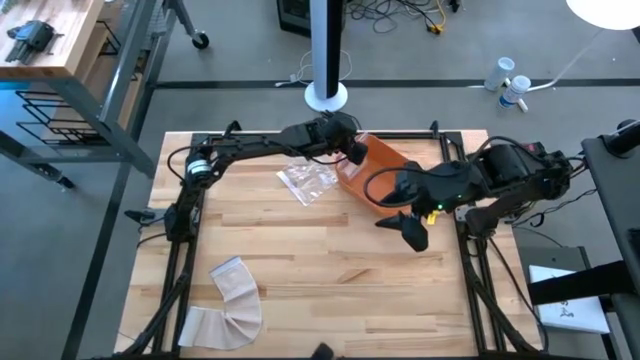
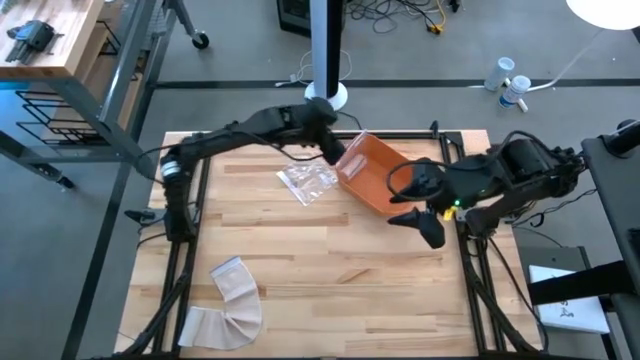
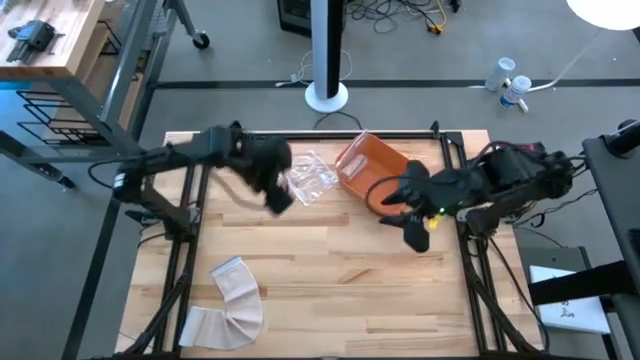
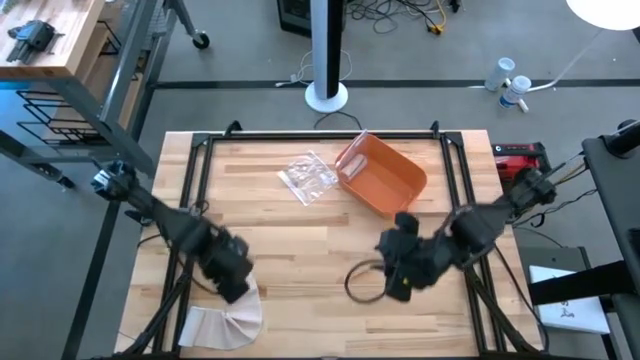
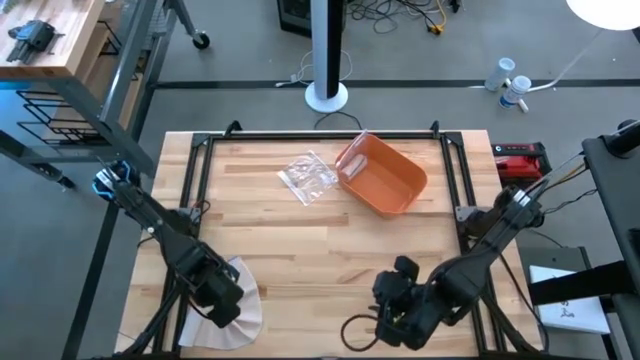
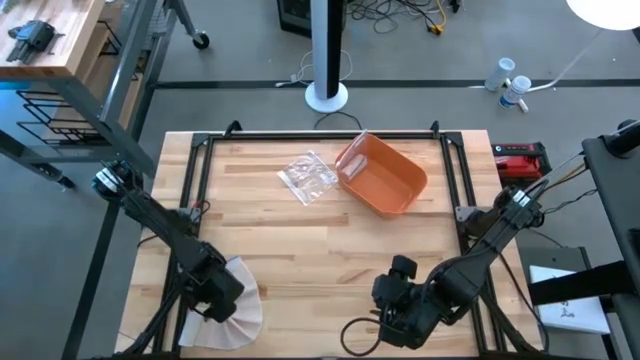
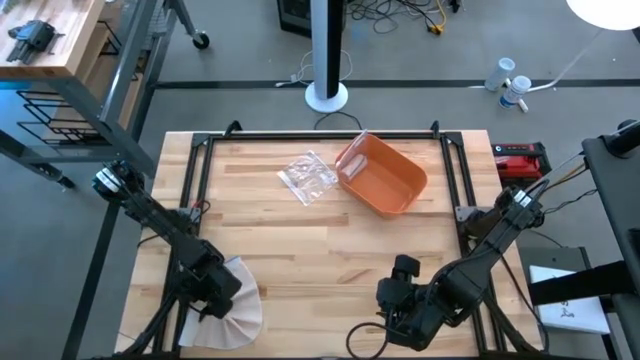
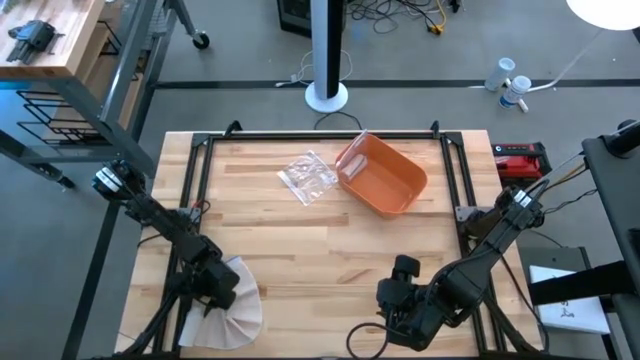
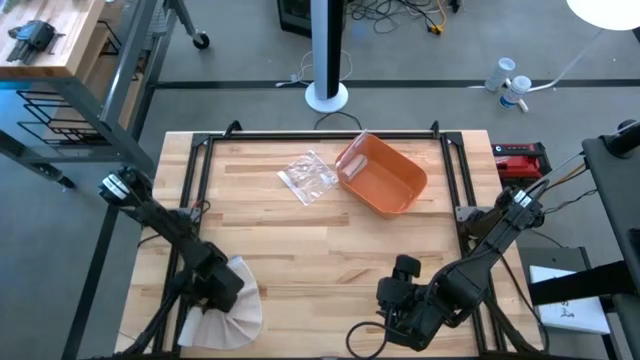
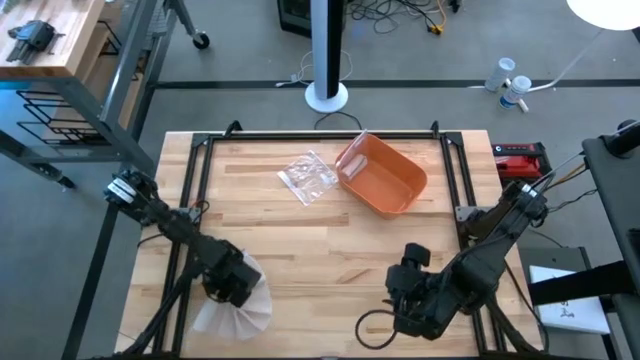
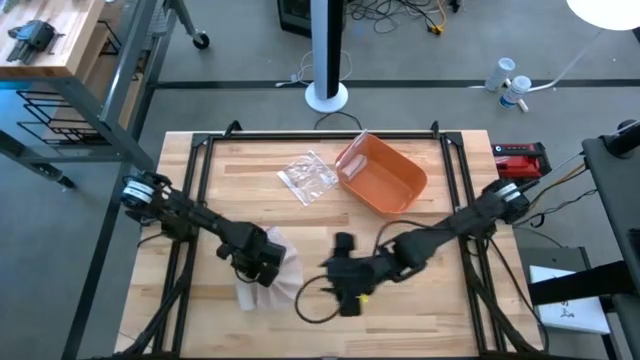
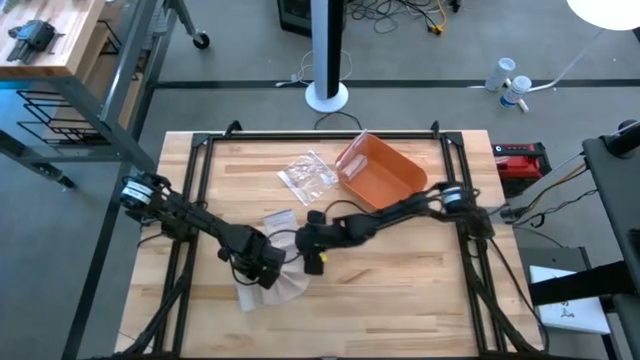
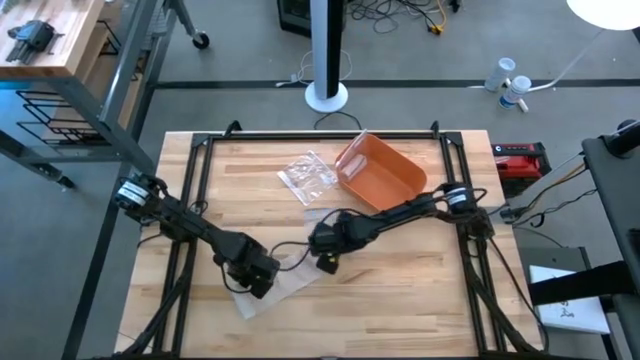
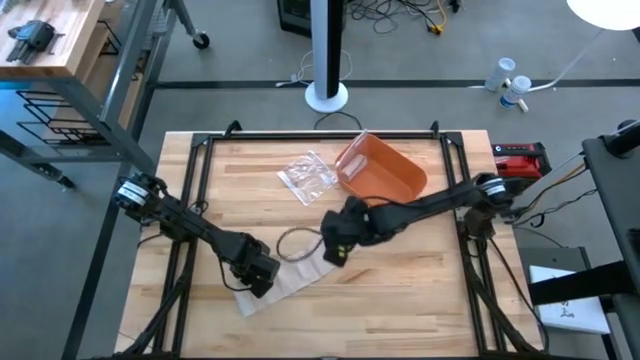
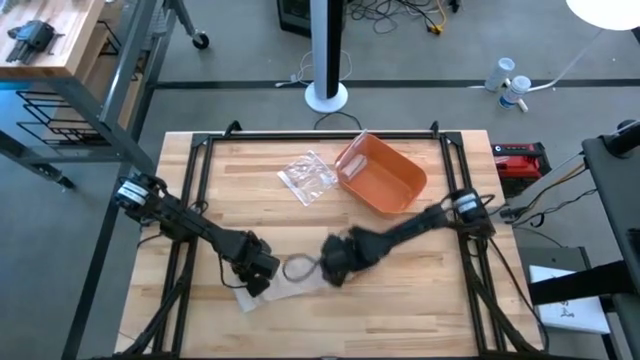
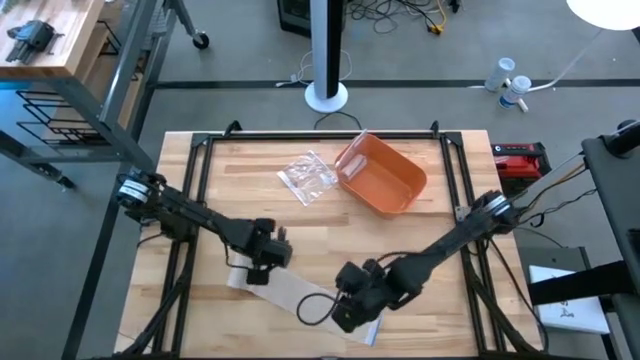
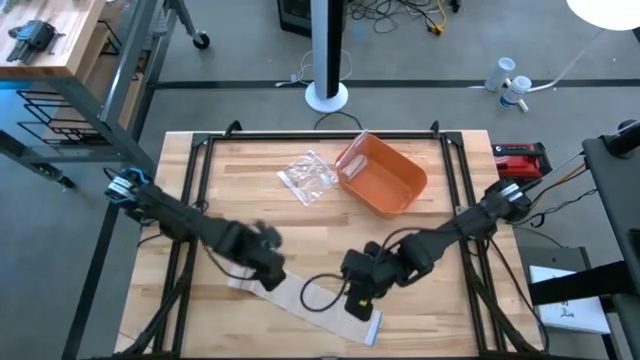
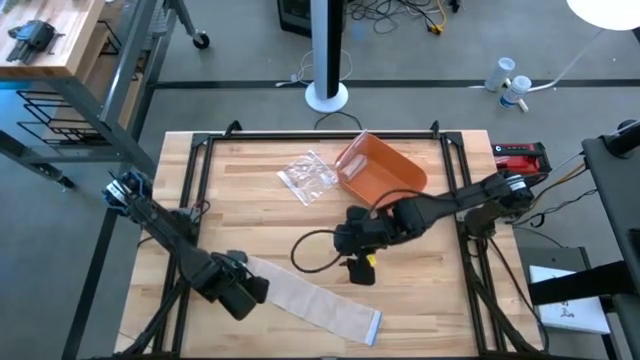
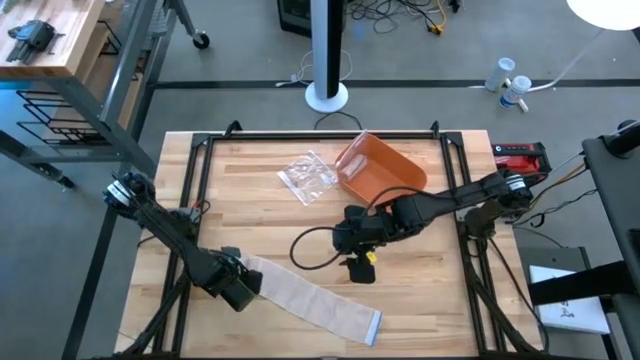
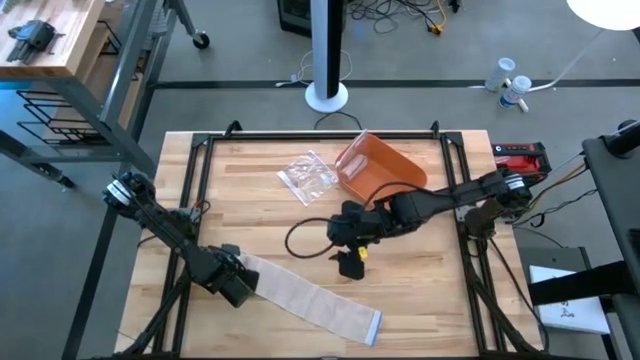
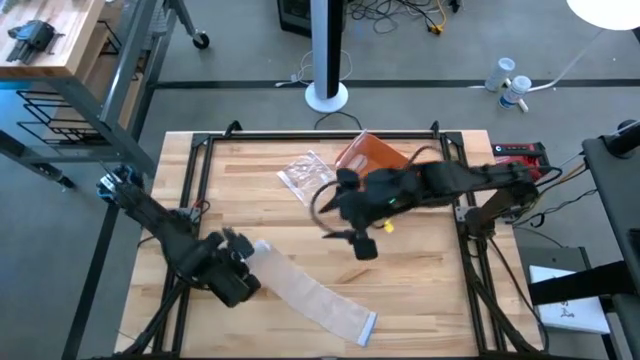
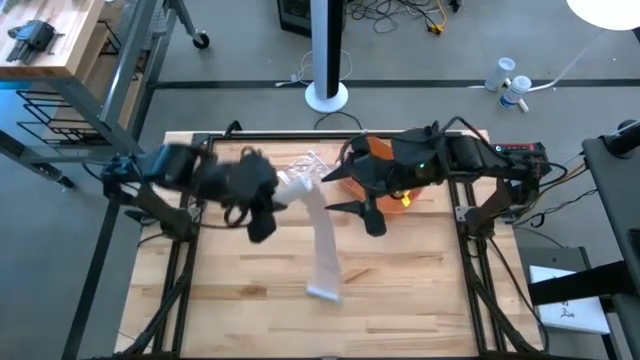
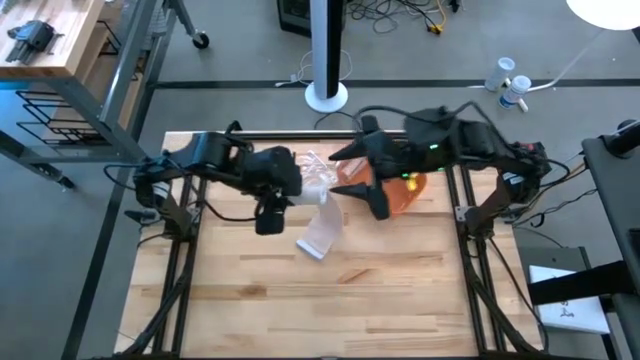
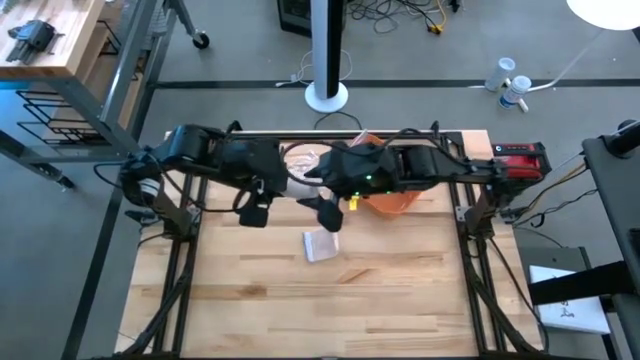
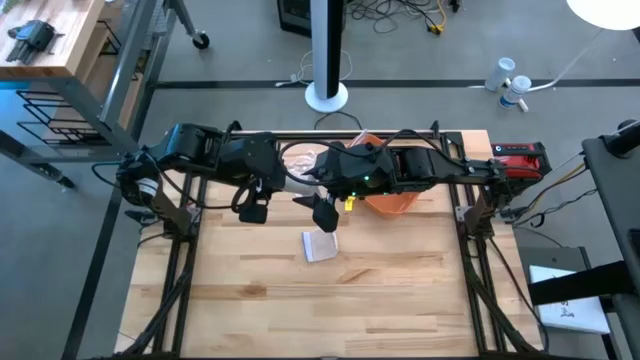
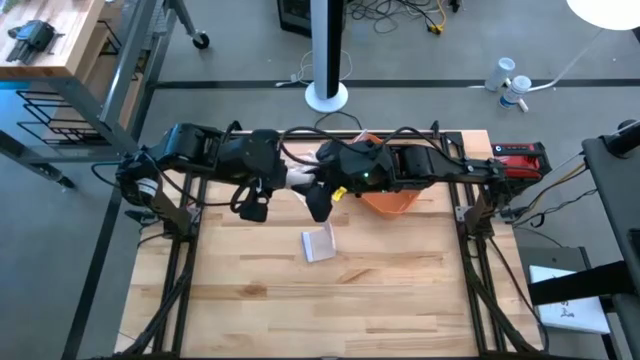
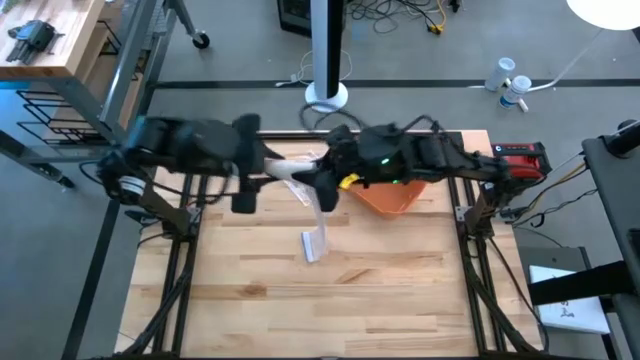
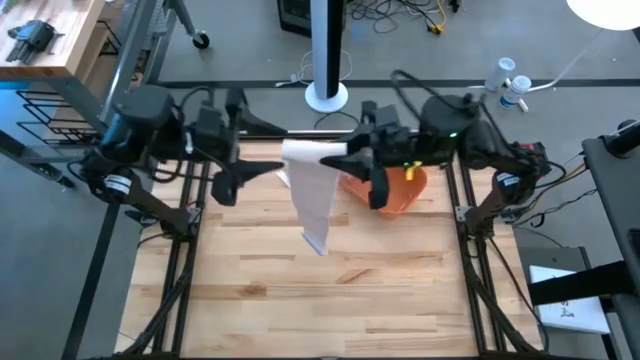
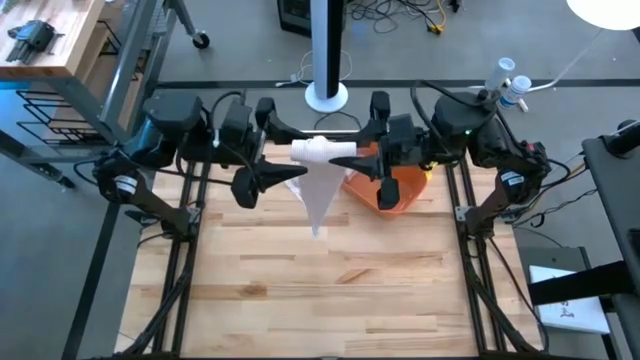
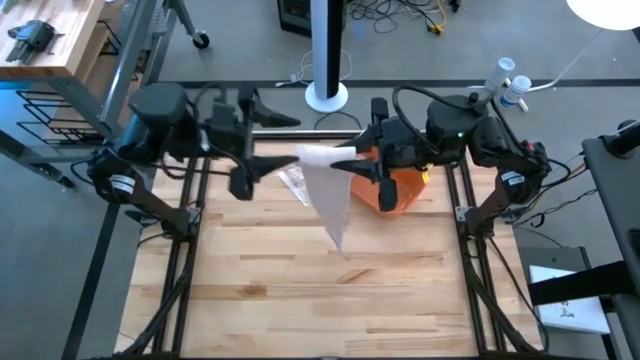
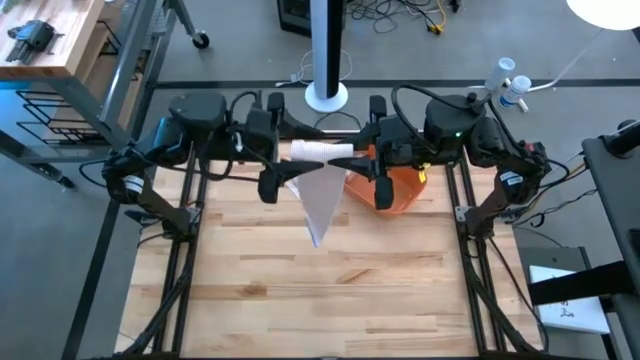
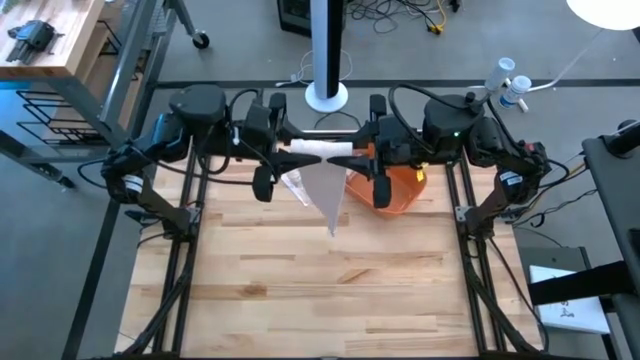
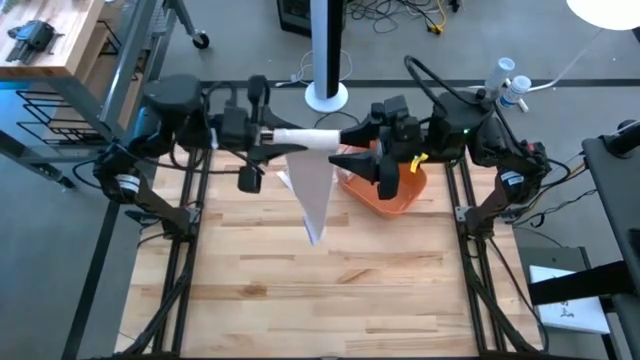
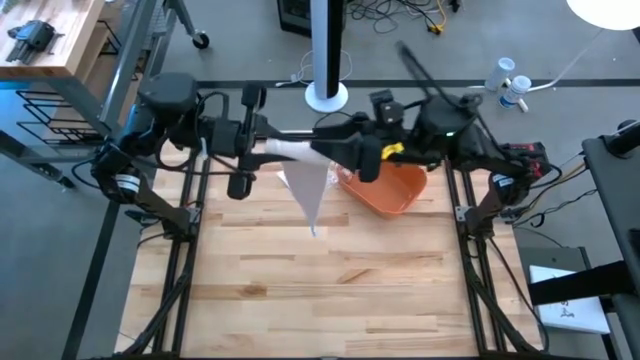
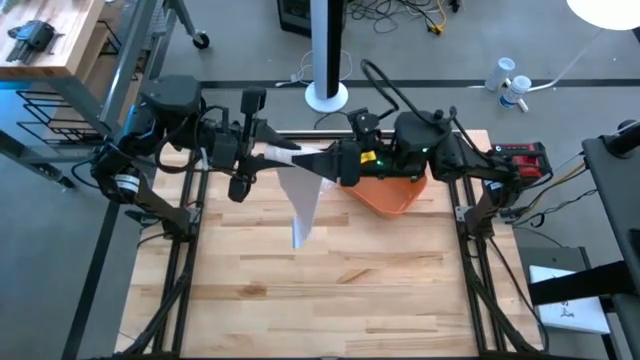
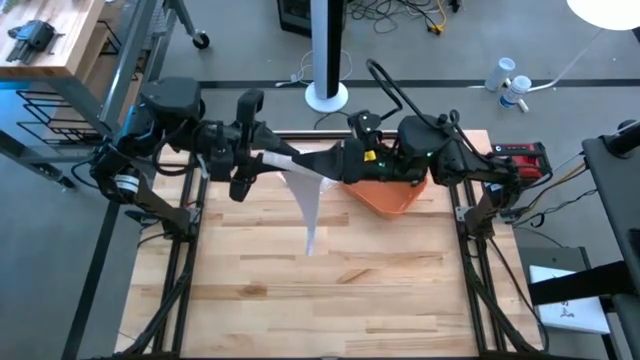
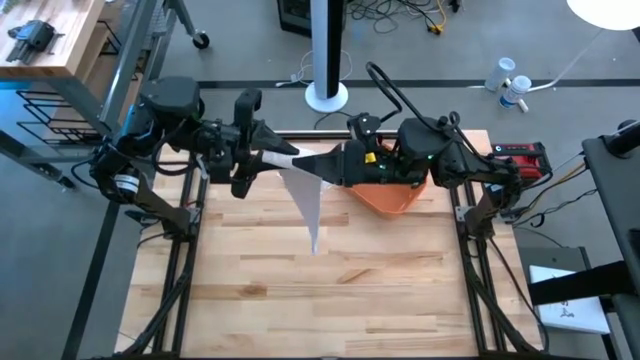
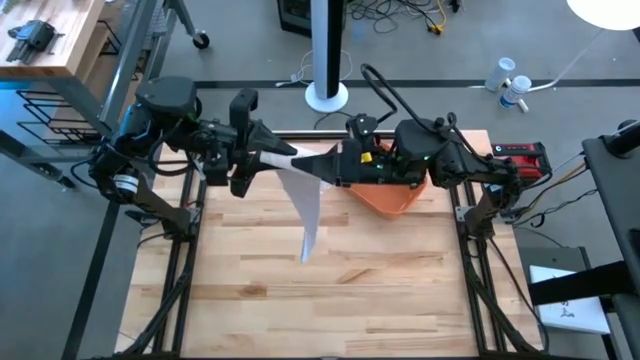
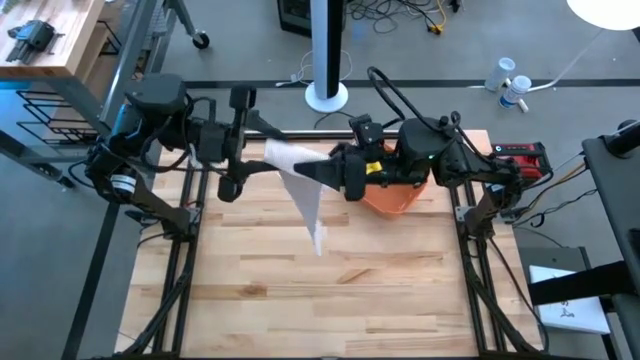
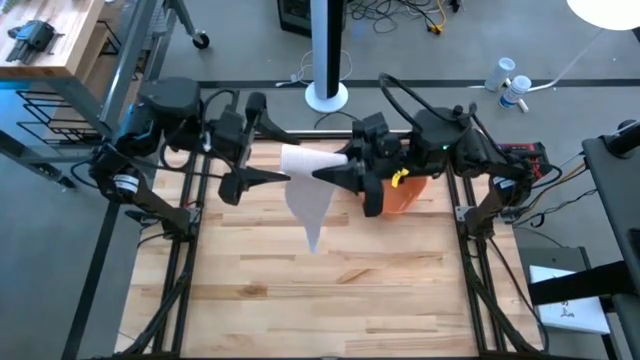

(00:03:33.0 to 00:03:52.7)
Task: Roll bandage
Roll the brown bandage

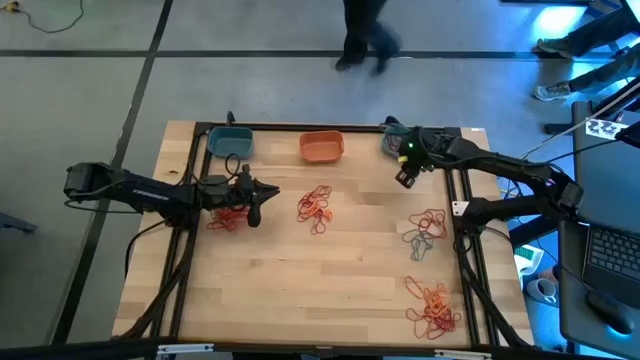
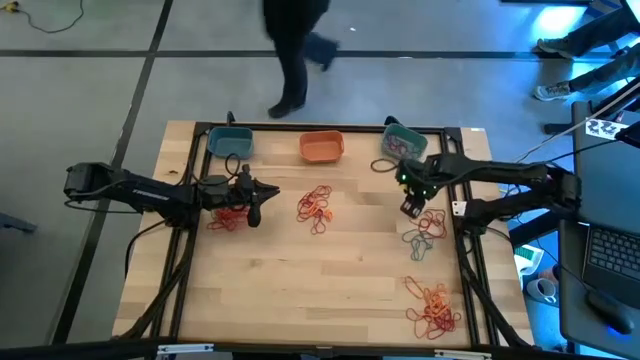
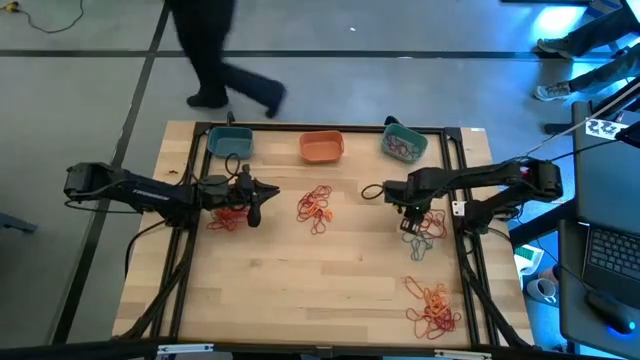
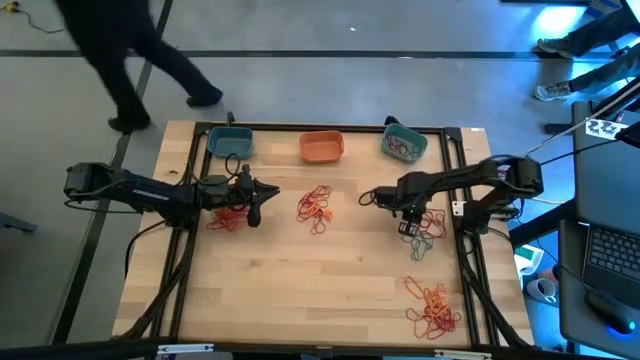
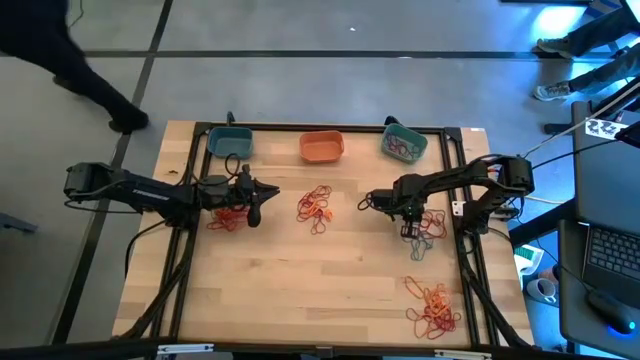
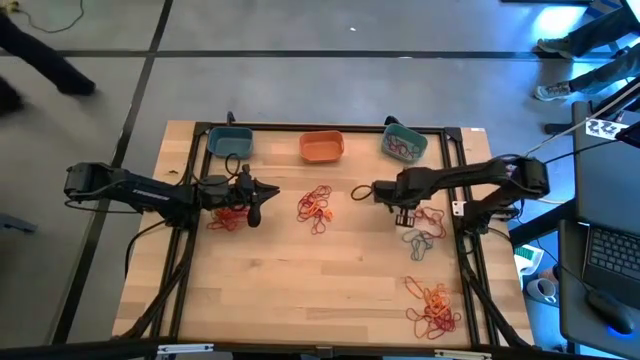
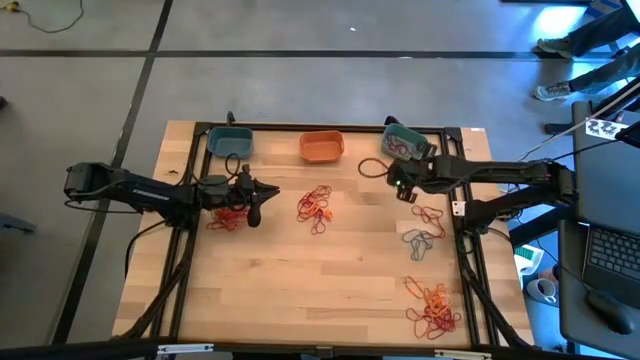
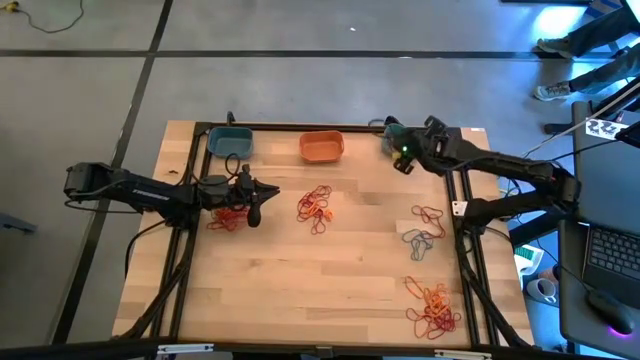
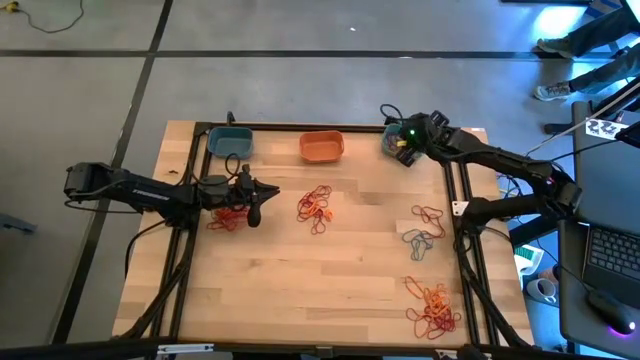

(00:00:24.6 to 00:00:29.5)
Task: Sort rubber bands into baskets
Put the red rubber band into the green bin
